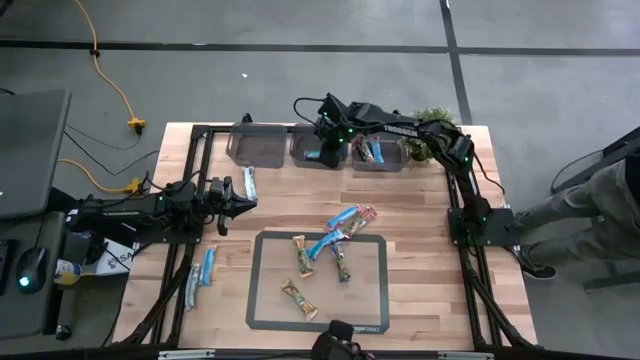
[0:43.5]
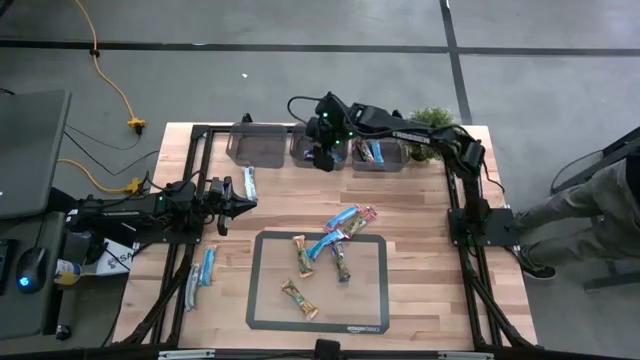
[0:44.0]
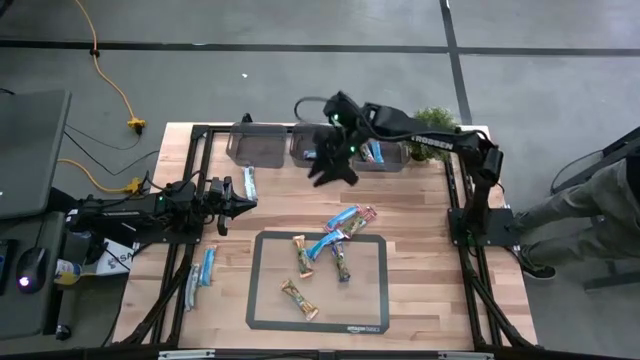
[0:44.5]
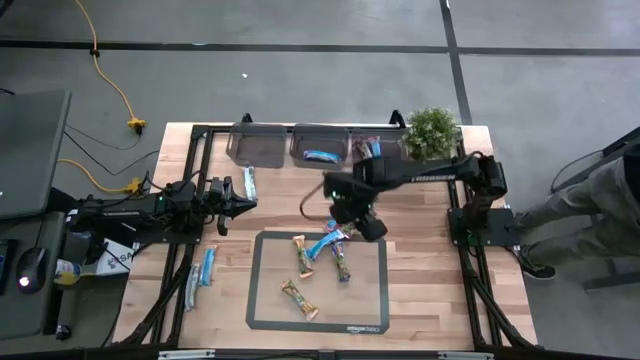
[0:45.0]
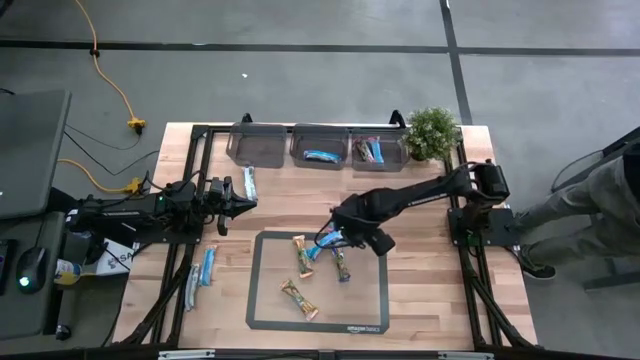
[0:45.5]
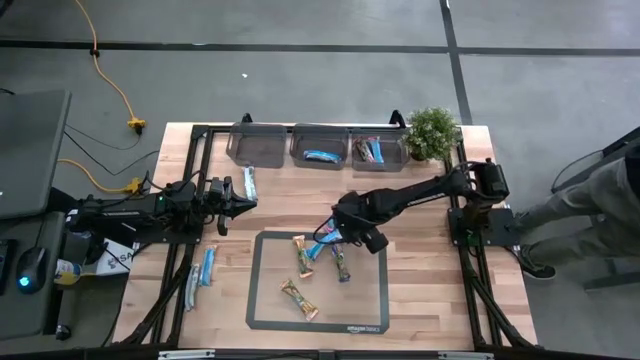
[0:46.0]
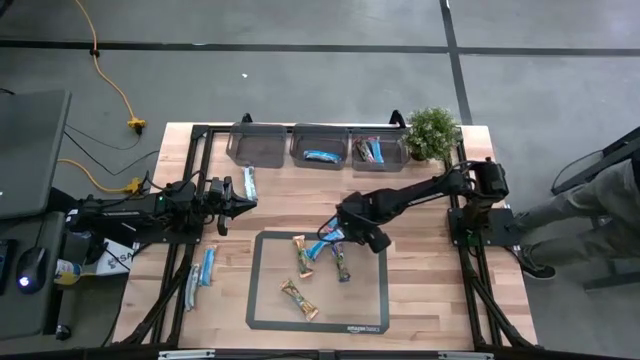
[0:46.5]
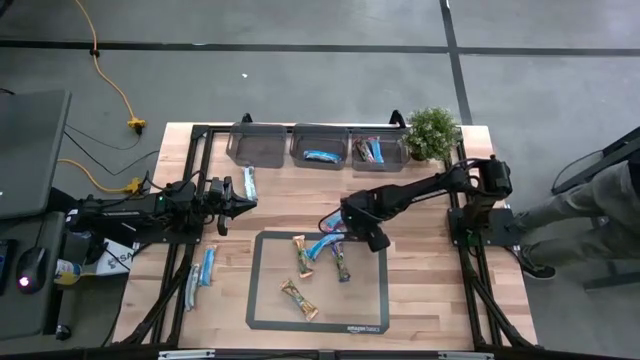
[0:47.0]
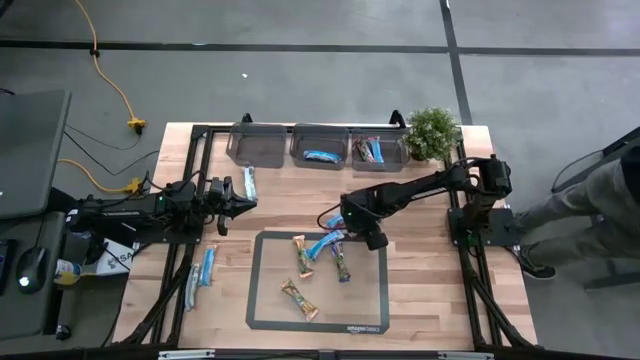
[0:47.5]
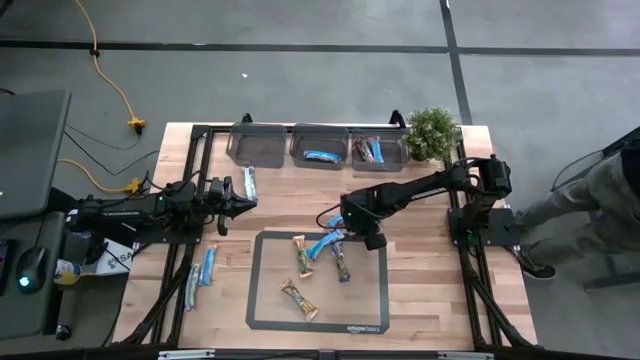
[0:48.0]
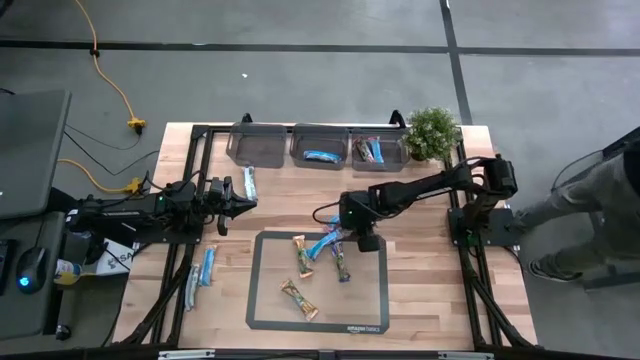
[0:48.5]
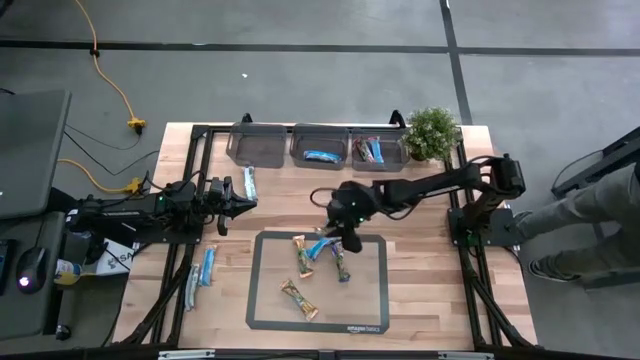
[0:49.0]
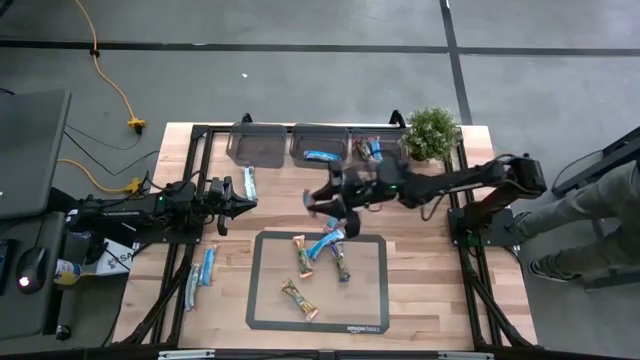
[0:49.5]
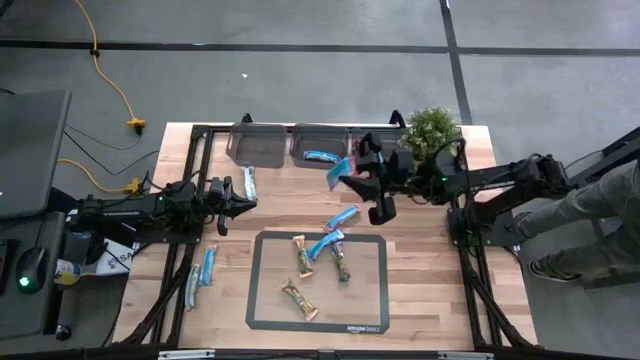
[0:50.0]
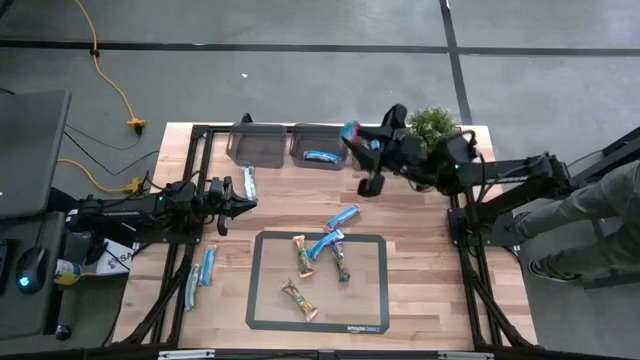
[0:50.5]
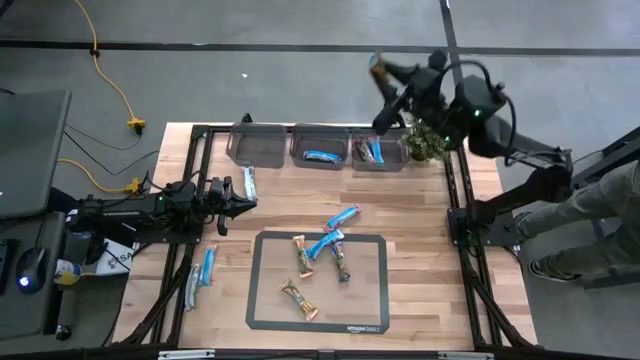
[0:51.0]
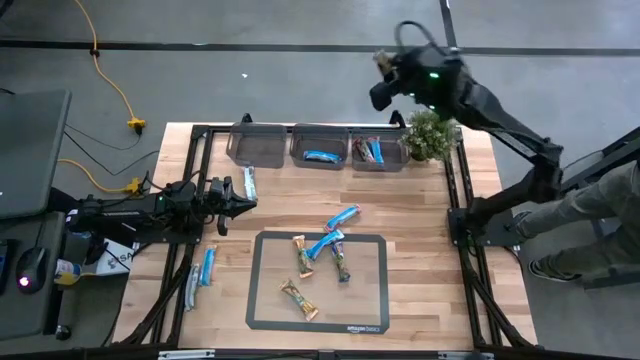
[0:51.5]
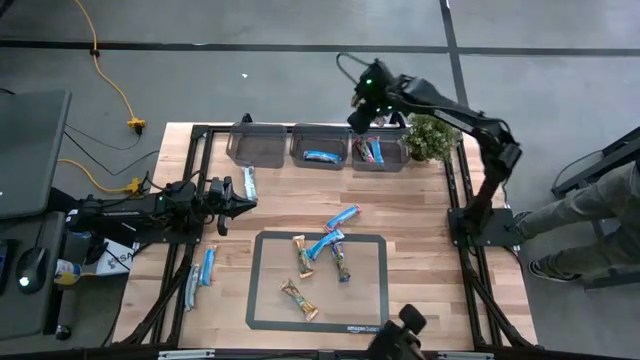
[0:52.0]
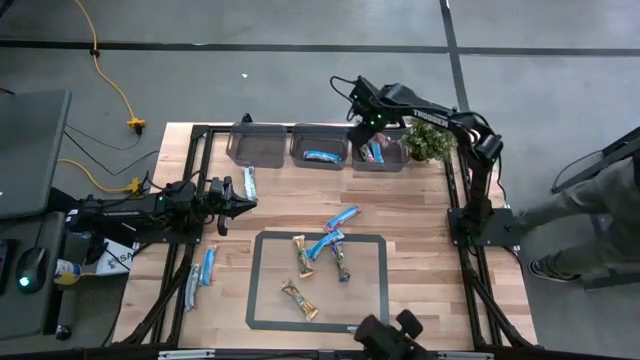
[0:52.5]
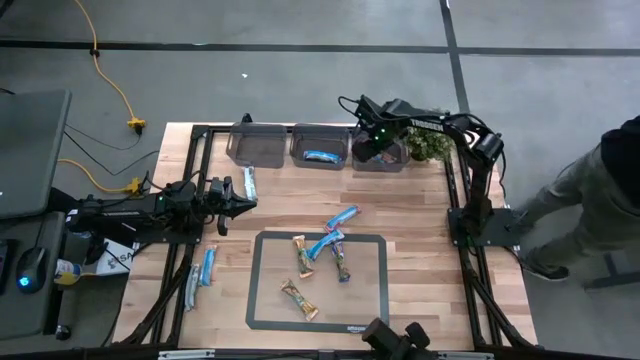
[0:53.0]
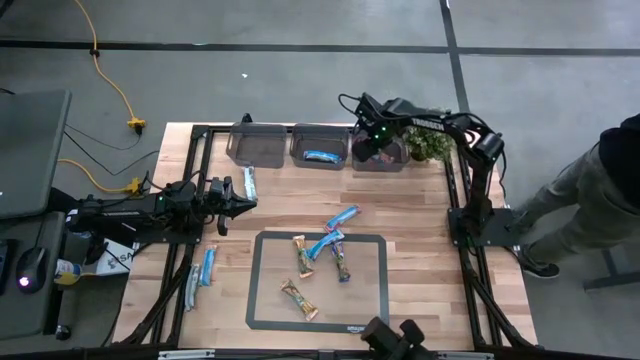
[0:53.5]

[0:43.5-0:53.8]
Task: Pick and place Granola Bars by type
Put the red granola bar into the right black bin

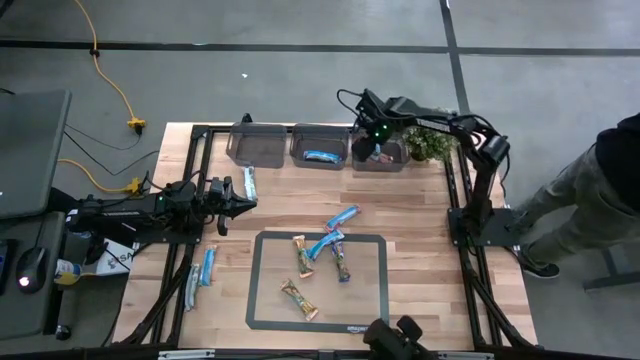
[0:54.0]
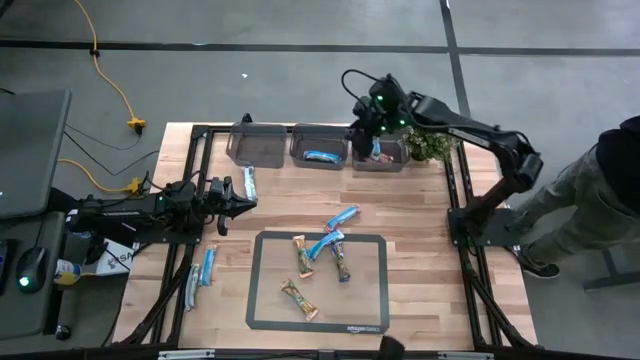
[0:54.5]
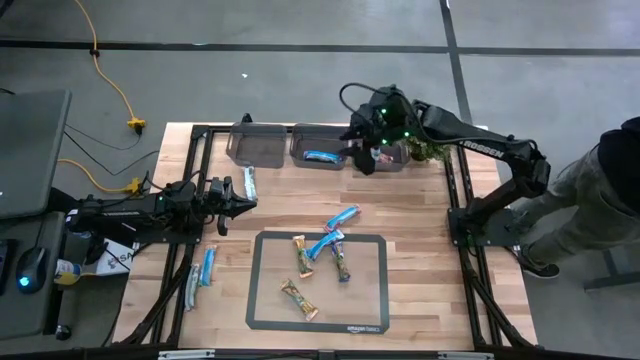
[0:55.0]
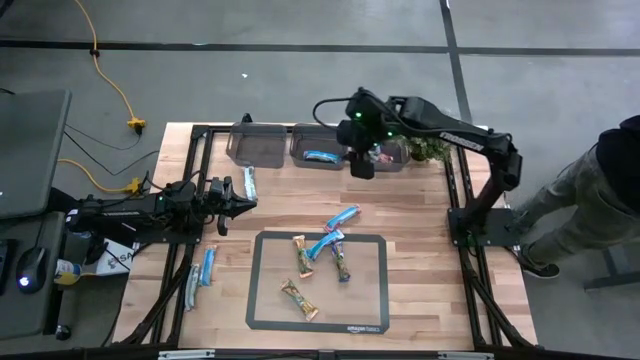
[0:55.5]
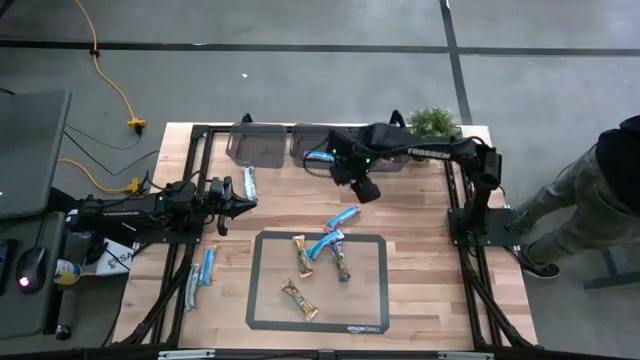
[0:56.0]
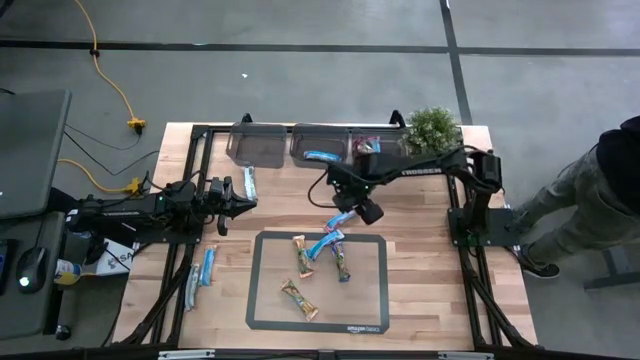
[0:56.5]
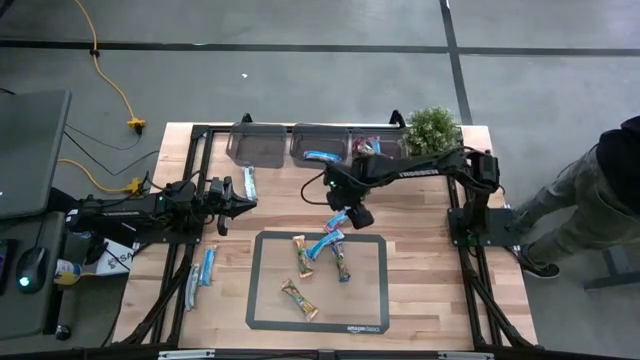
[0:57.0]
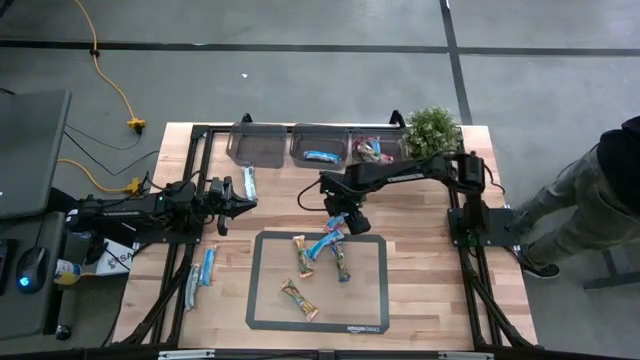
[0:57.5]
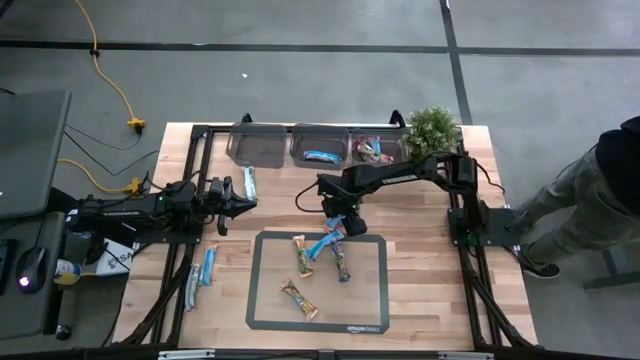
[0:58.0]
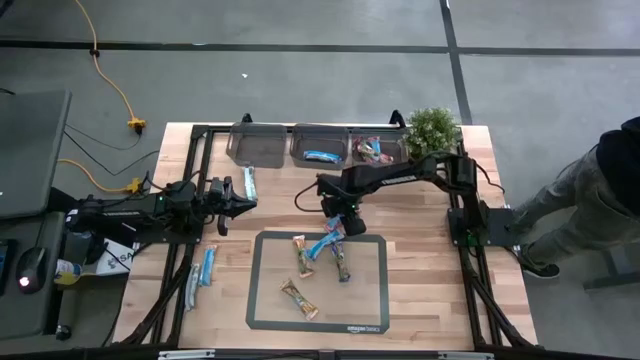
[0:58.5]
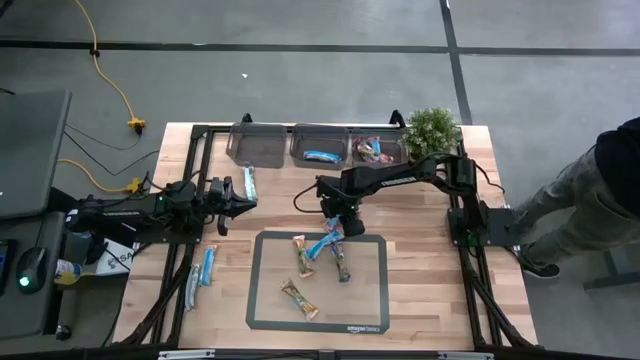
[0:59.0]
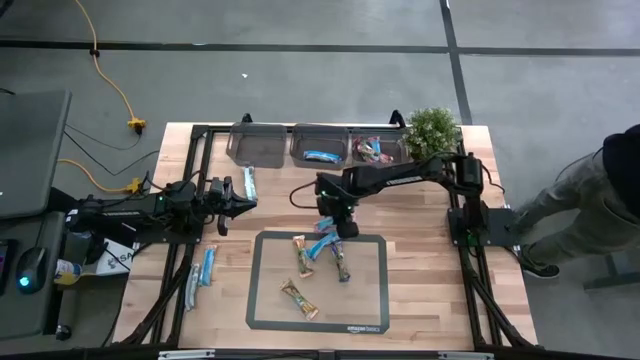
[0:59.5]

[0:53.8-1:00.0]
Put the red granola bar into the right black bin
